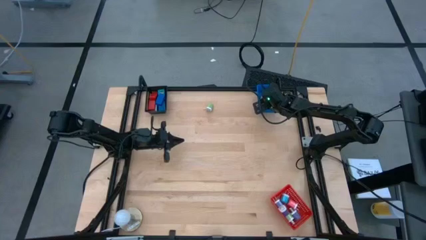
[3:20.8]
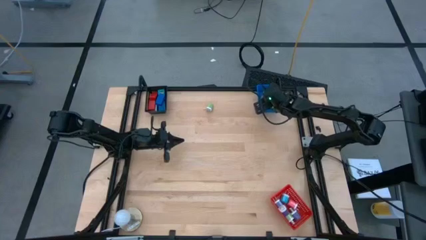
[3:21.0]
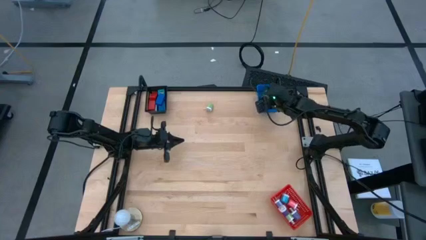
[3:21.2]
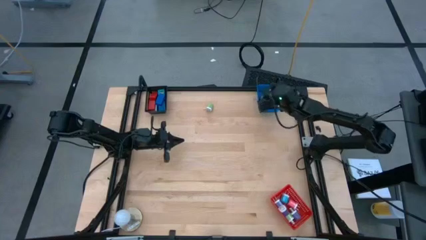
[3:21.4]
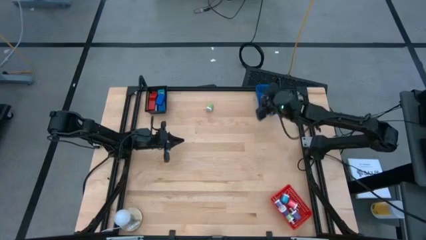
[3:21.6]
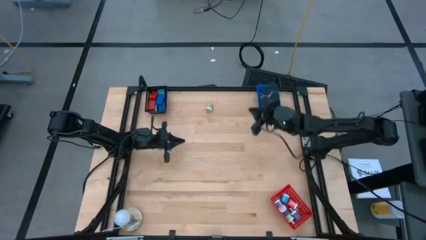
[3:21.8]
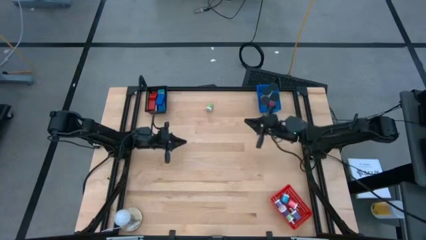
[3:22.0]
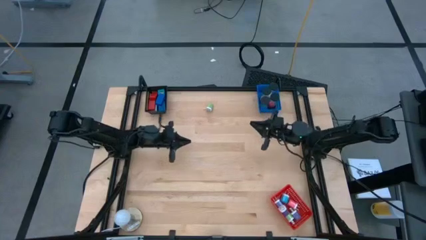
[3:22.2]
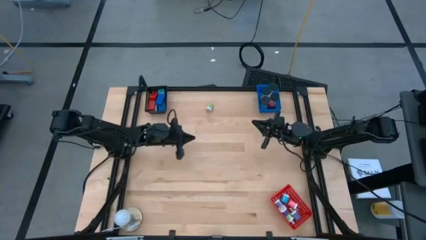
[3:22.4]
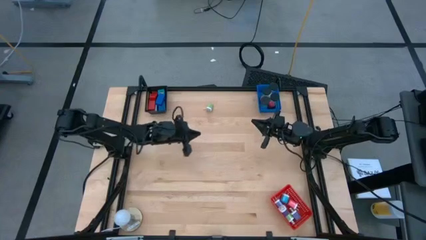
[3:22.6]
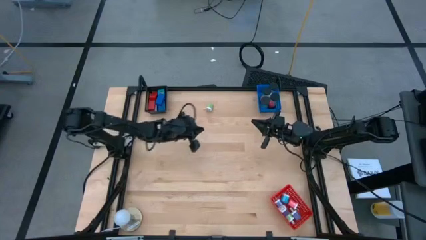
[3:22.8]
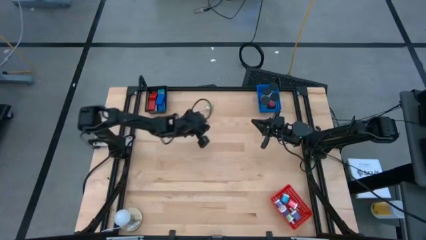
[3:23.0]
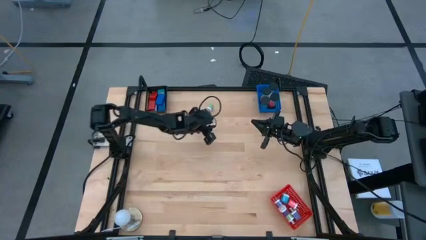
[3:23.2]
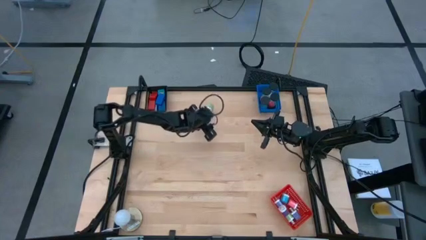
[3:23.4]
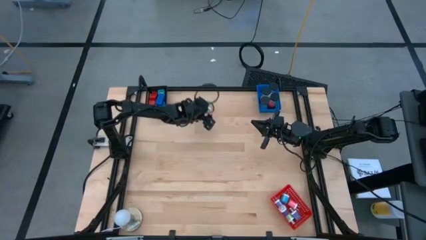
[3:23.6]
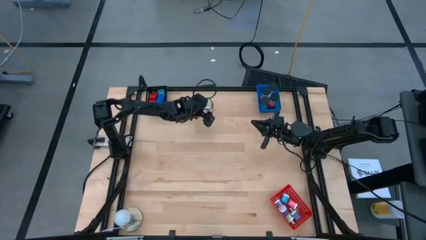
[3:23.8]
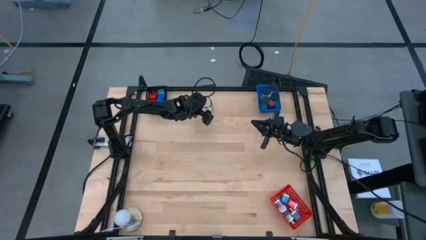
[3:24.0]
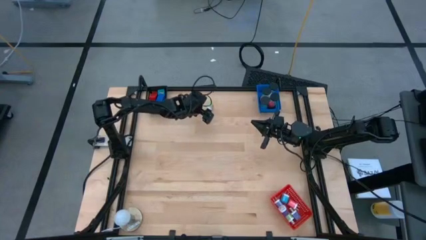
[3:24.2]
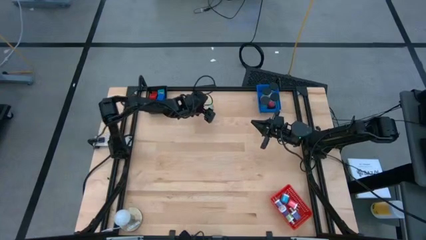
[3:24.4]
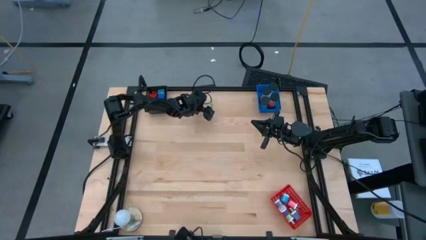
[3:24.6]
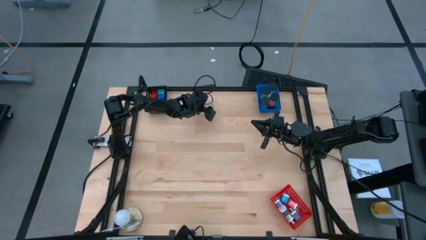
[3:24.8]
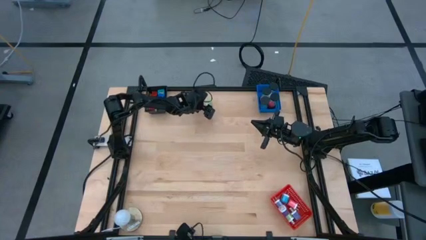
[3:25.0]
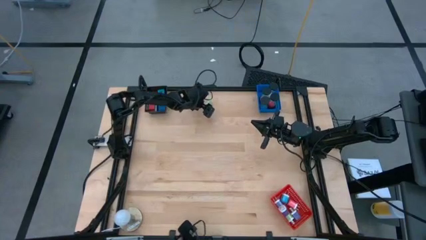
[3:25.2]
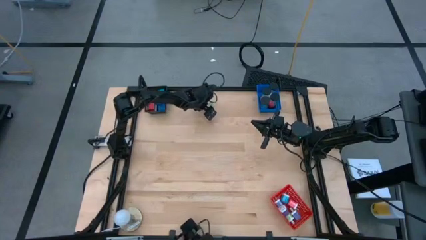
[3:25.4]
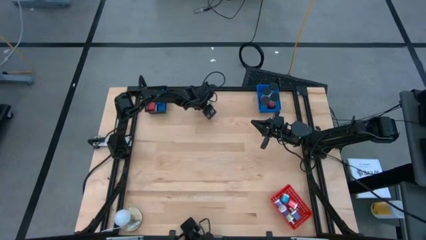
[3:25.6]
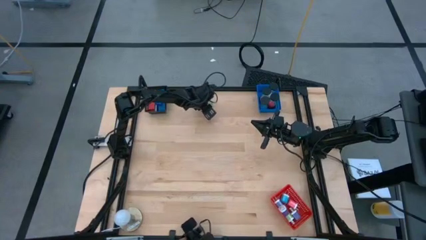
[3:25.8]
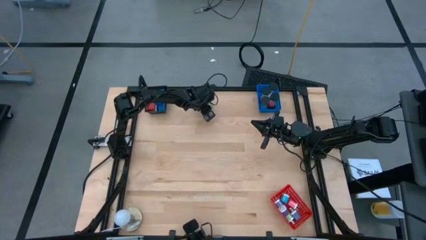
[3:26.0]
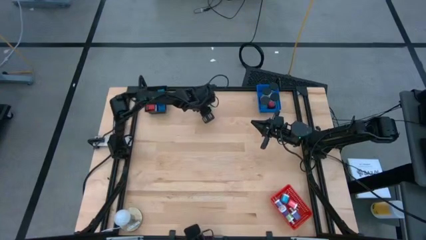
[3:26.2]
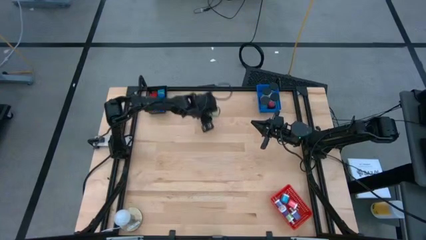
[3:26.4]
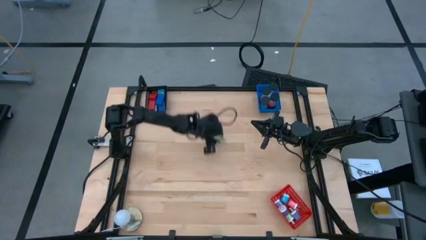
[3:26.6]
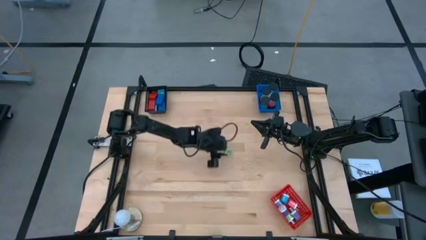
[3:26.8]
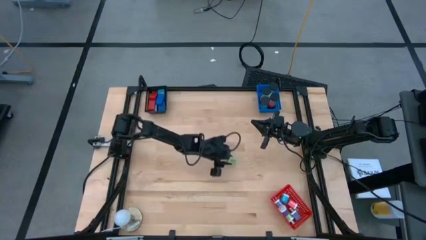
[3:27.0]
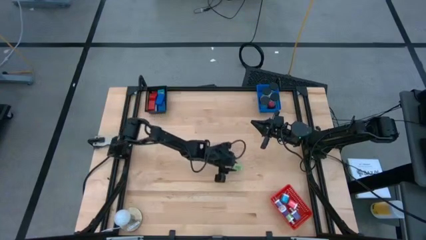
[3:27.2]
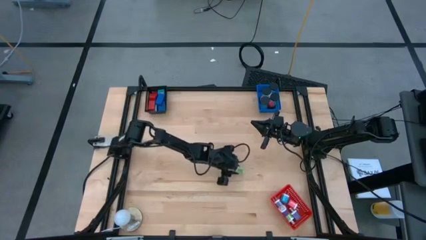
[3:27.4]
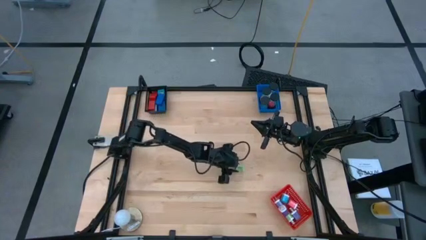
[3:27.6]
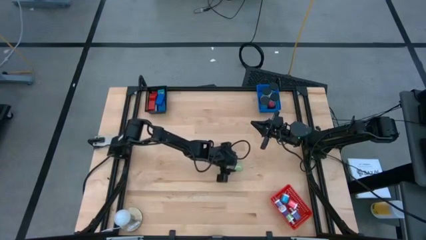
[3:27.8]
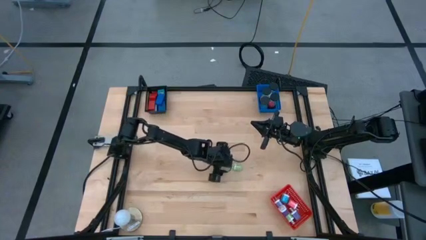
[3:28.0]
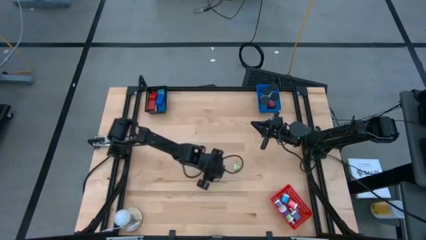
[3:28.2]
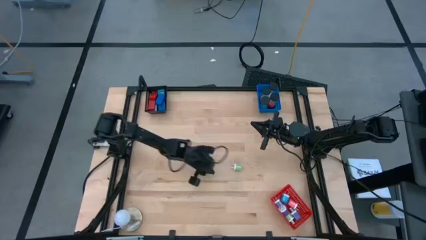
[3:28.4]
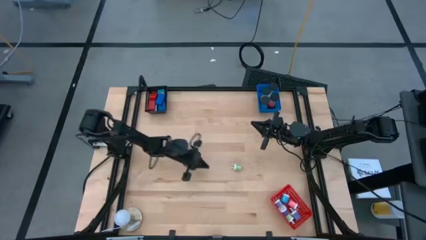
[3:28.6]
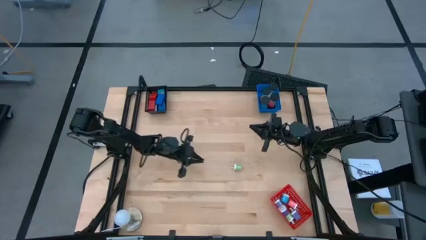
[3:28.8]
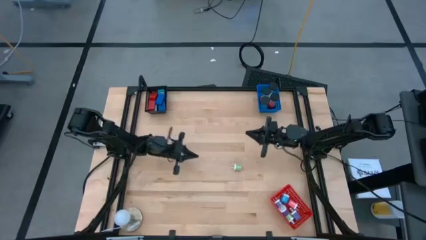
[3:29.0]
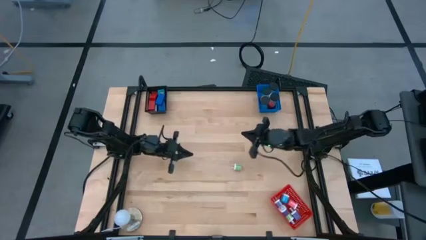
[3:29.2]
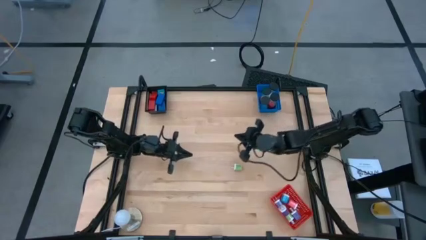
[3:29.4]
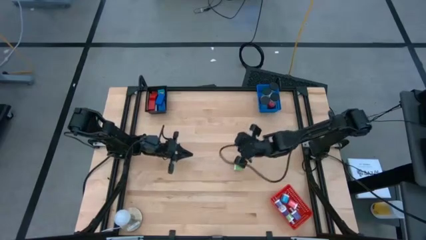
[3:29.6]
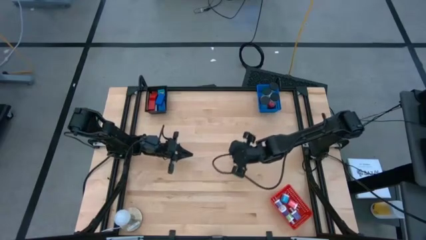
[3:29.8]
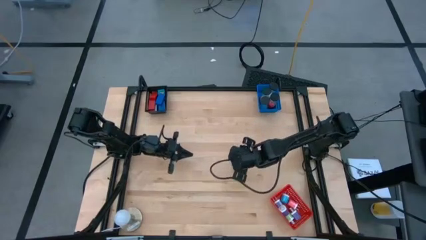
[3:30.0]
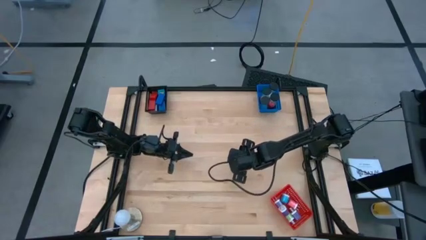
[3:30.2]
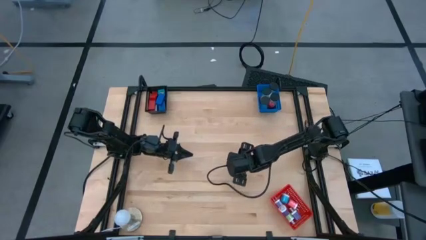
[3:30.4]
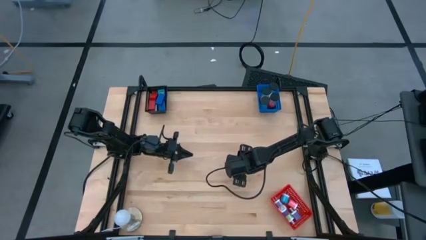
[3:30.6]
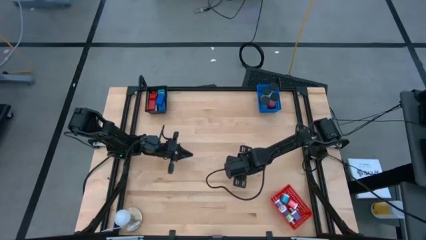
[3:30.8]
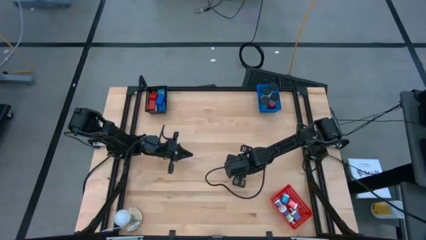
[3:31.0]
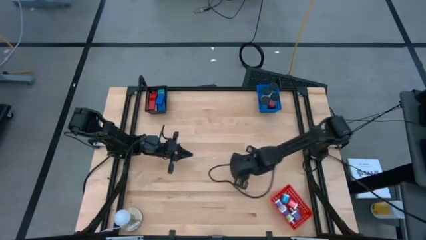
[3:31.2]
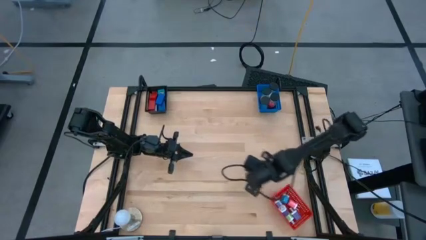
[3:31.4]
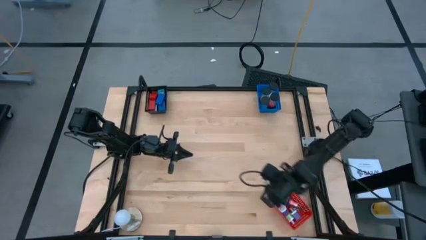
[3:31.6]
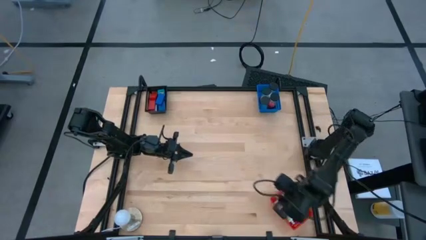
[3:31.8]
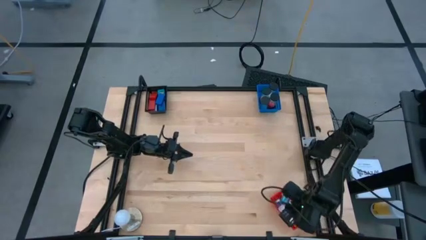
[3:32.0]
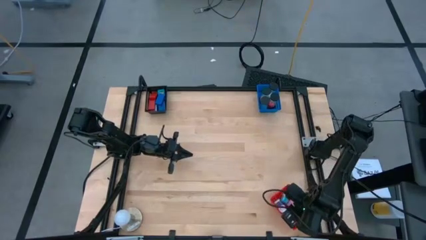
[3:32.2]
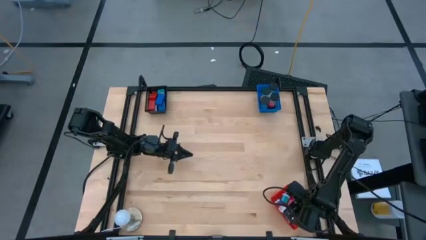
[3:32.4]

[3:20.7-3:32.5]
Task: Pick & Place Office items
Put the green charger adapter into the red basket

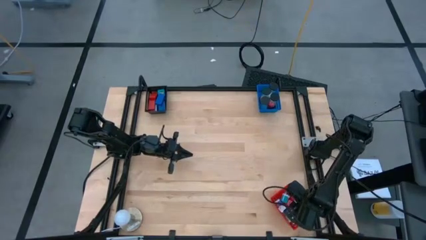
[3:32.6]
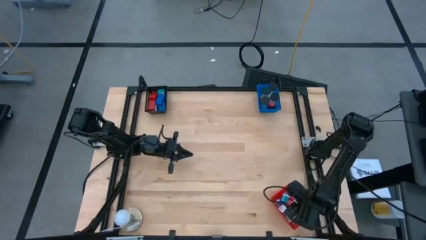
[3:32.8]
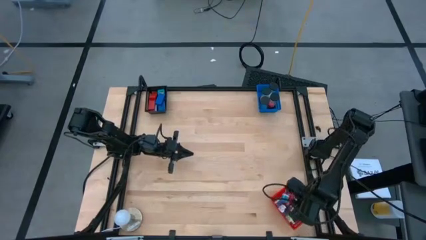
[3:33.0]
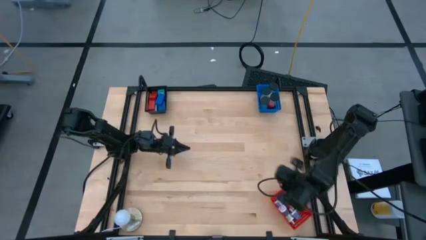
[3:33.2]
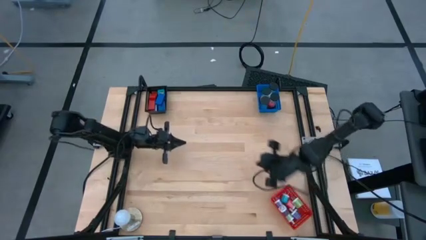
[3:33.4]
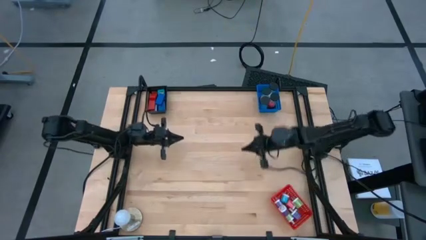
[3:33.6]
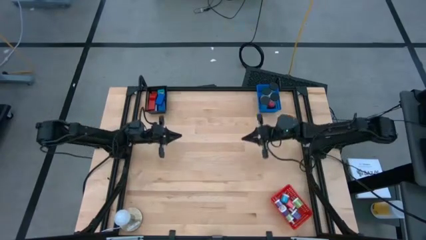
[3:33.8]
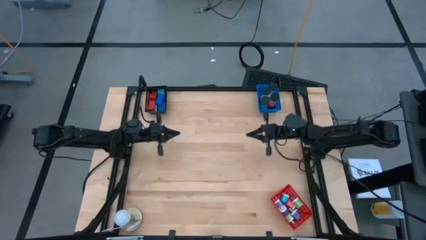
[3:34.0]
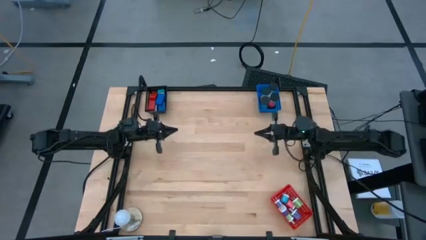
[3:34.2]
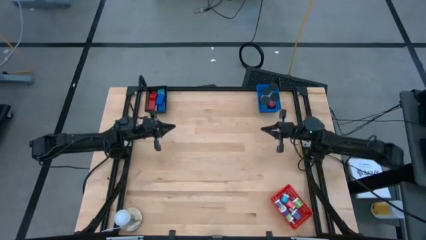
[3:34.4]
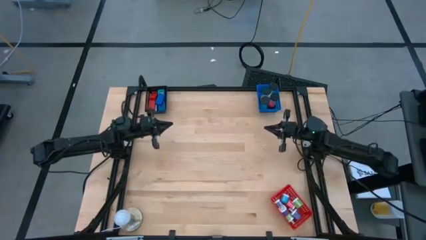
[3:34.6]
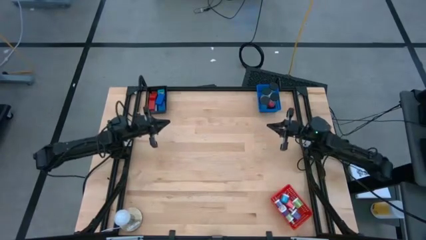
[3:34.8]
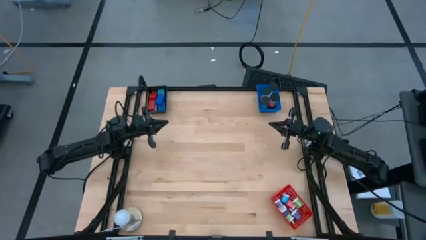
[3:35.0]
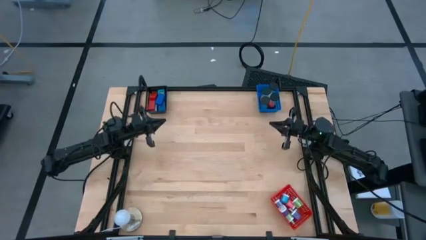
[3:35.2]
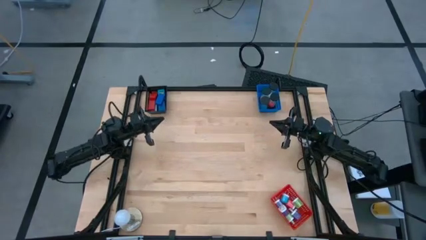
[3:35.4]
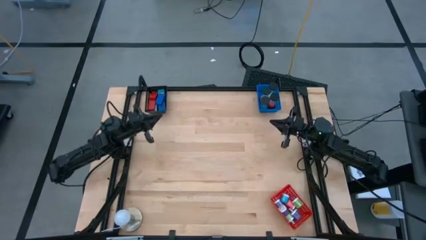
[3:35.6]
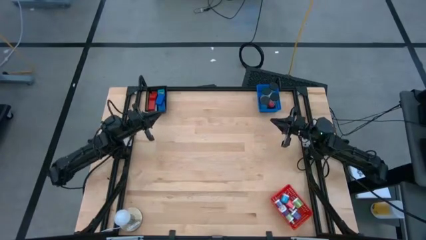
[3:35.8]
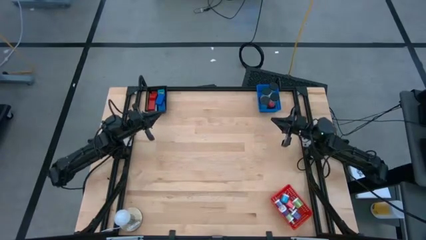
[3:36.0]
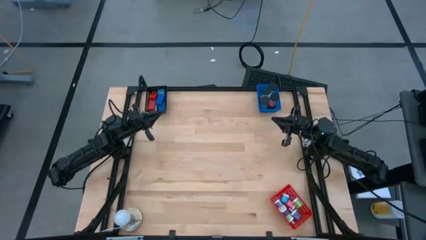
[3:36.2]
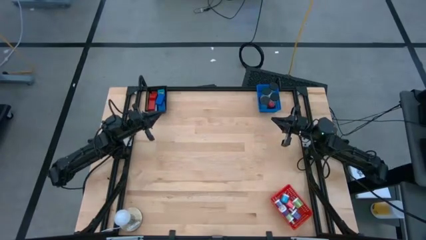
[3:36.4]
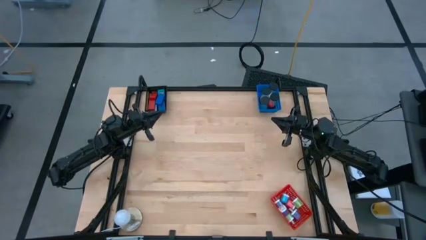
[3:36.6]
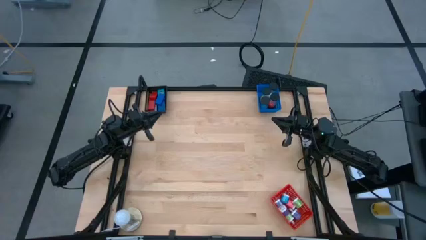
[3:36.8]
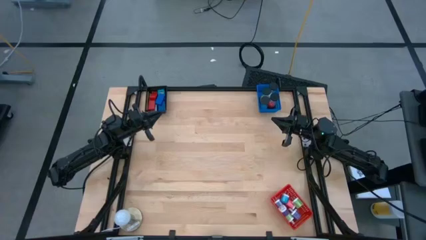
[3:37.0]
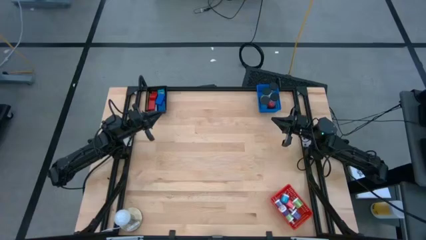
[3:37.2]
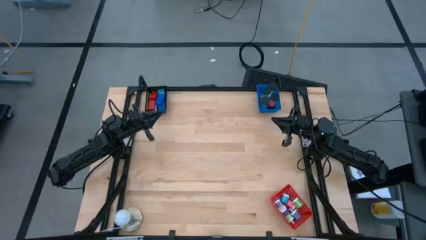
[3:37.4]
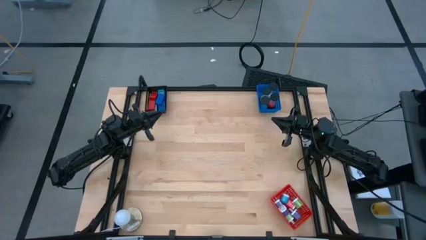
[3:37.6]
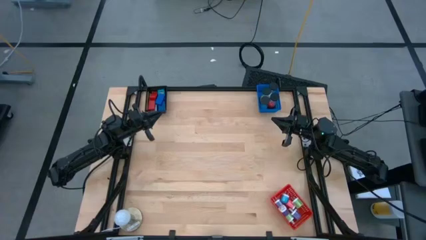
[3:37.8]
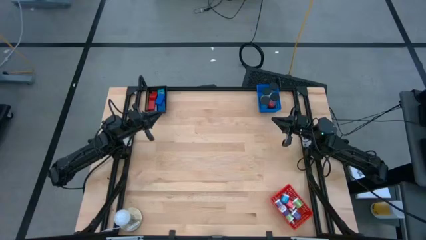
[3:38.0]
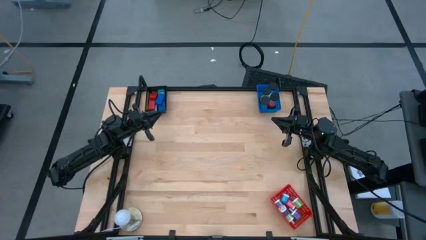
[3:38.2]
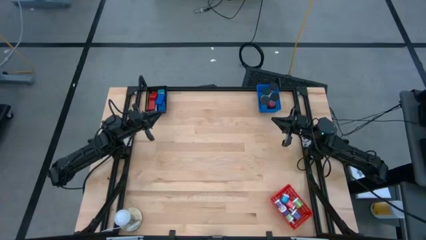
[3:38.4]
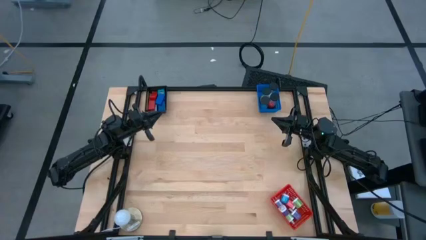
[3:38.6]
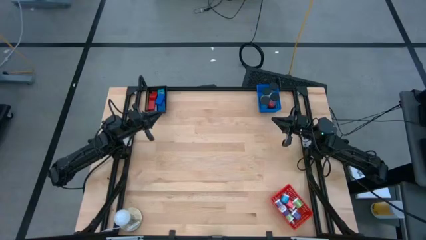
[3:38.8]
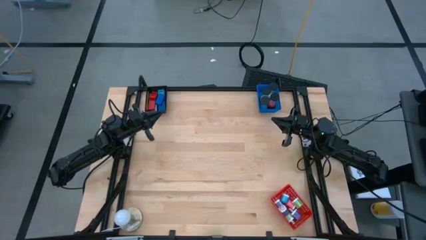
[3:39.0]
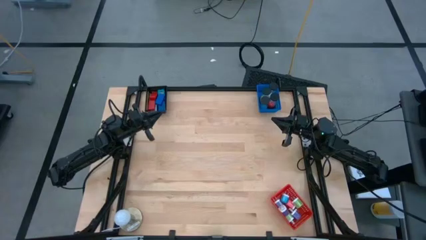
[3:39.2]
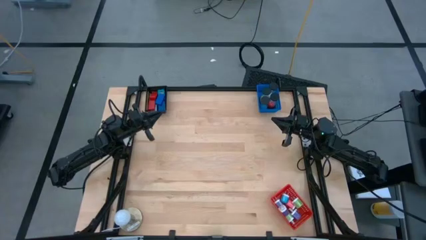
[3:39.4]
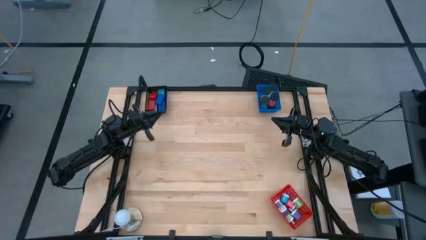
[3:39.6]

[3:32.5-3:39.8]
Return to Home Position
